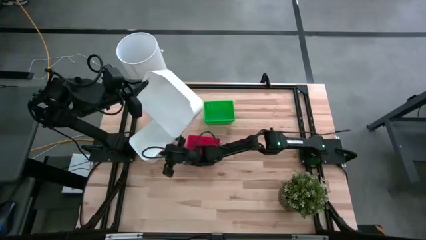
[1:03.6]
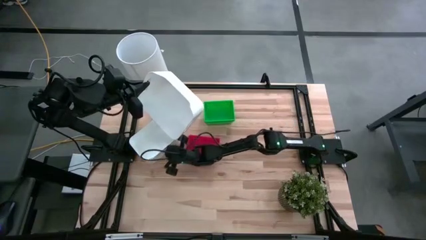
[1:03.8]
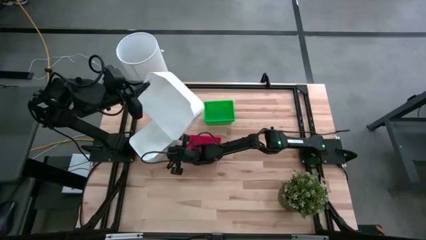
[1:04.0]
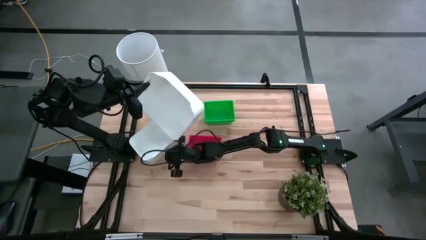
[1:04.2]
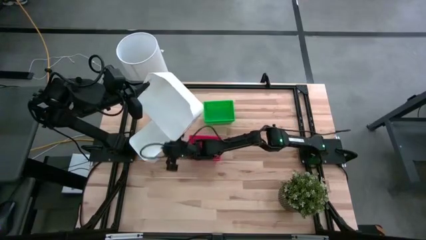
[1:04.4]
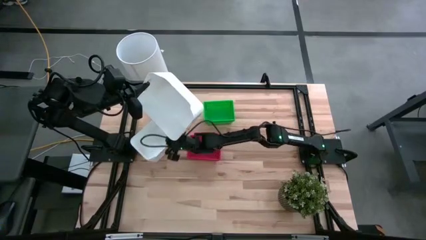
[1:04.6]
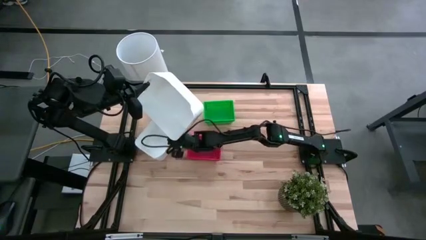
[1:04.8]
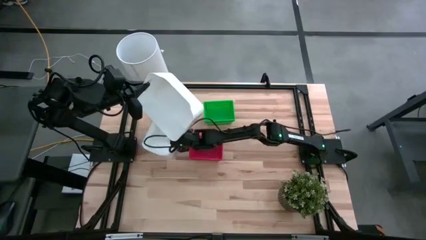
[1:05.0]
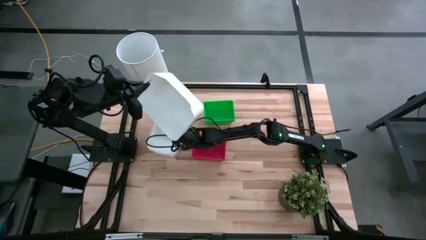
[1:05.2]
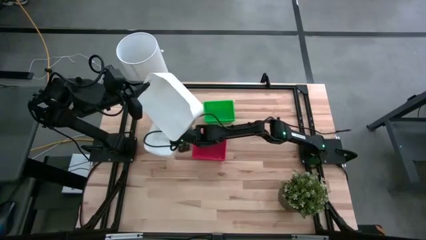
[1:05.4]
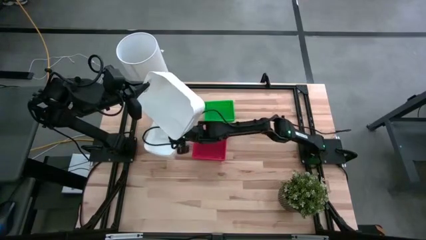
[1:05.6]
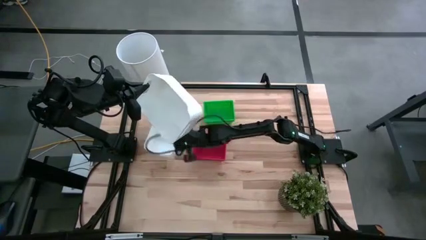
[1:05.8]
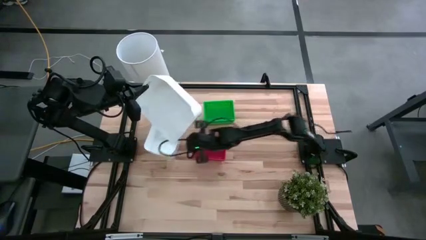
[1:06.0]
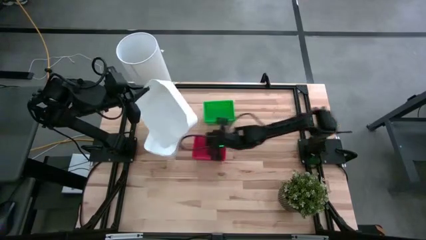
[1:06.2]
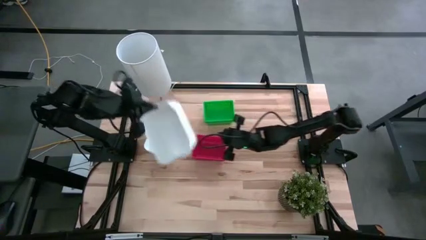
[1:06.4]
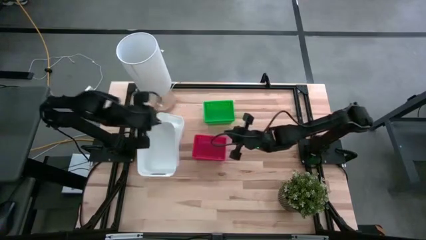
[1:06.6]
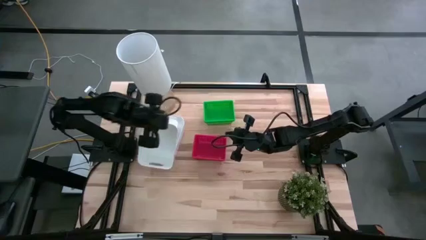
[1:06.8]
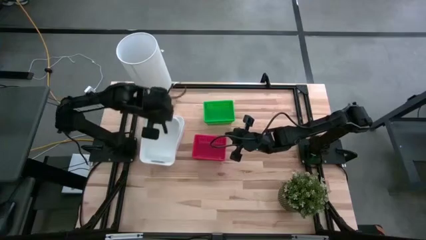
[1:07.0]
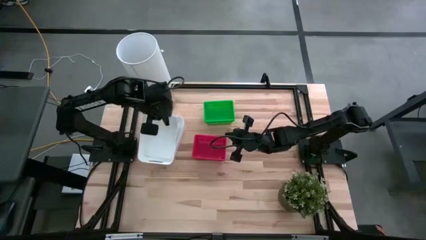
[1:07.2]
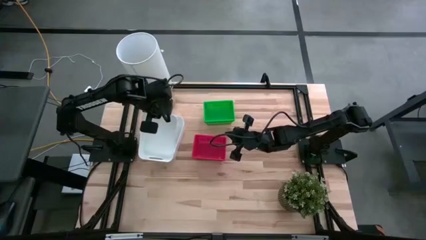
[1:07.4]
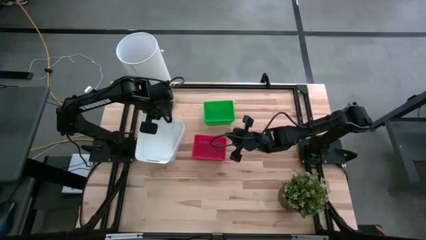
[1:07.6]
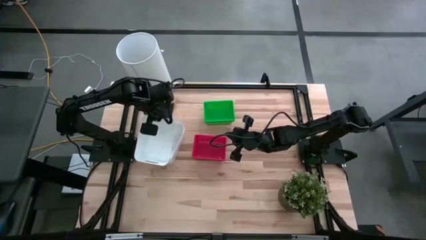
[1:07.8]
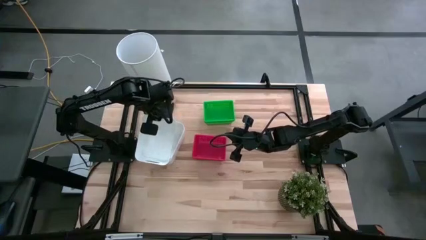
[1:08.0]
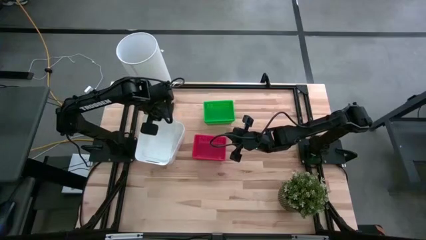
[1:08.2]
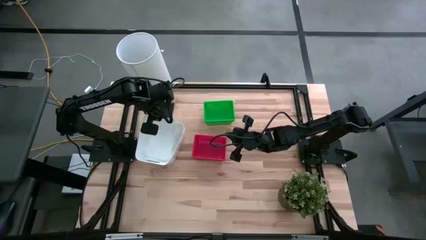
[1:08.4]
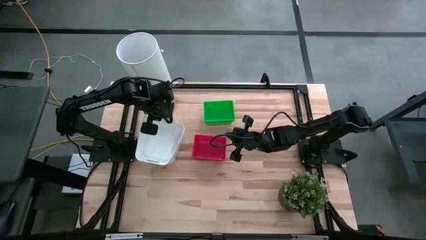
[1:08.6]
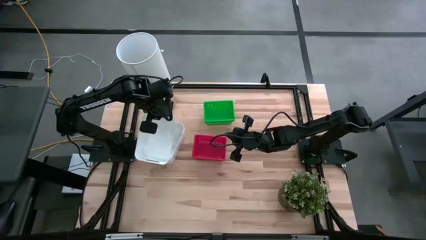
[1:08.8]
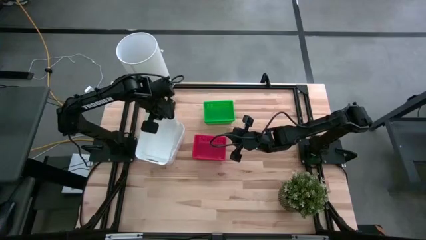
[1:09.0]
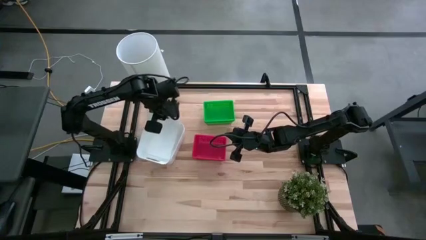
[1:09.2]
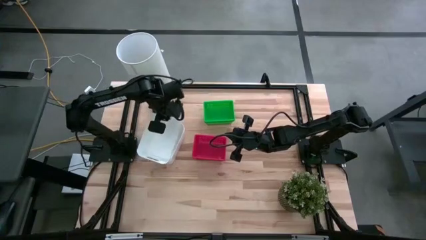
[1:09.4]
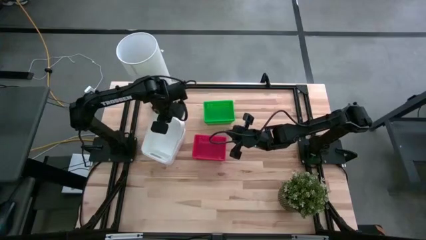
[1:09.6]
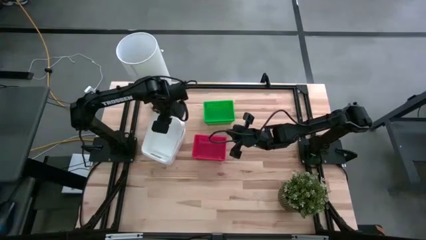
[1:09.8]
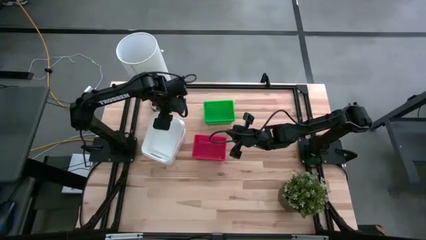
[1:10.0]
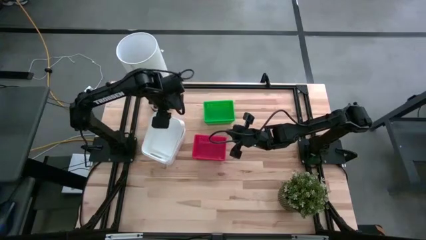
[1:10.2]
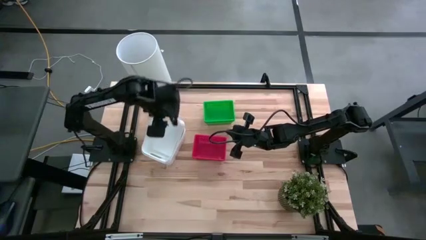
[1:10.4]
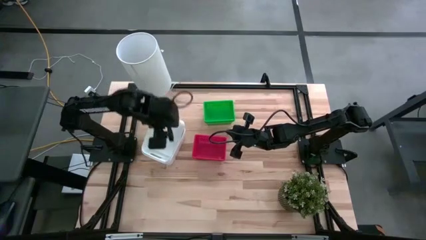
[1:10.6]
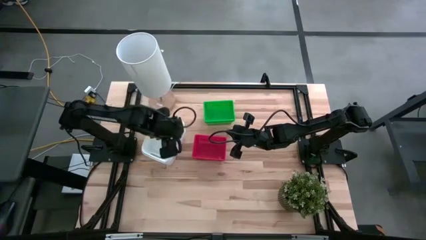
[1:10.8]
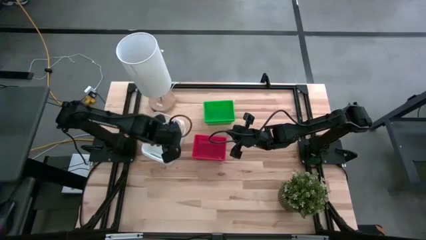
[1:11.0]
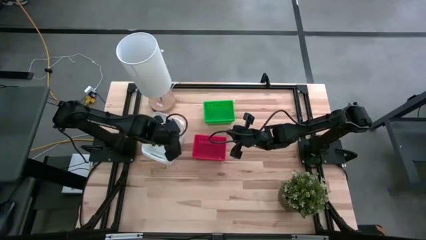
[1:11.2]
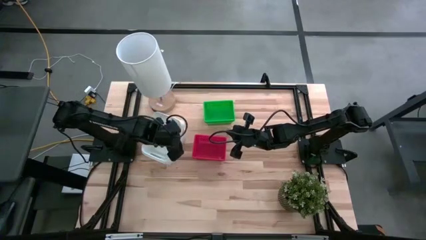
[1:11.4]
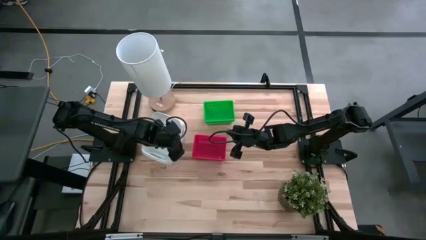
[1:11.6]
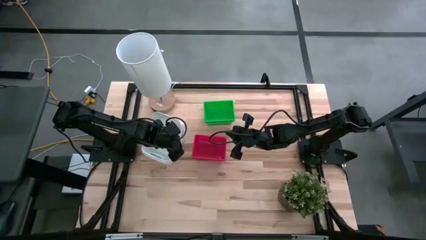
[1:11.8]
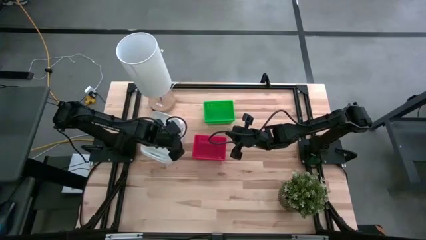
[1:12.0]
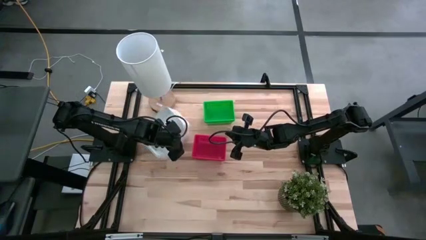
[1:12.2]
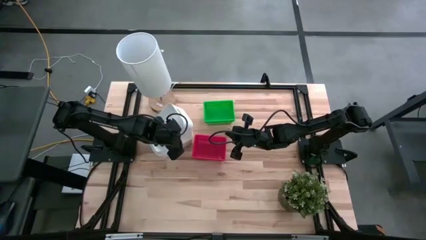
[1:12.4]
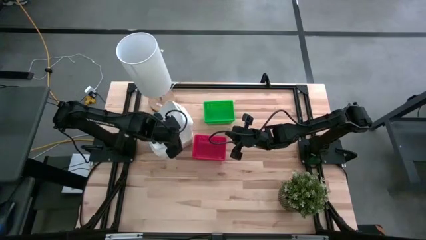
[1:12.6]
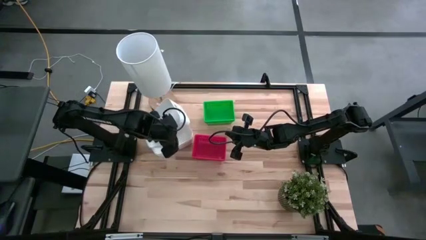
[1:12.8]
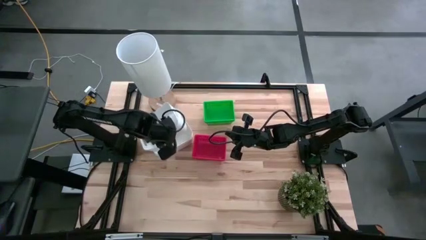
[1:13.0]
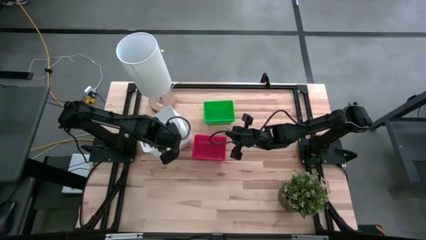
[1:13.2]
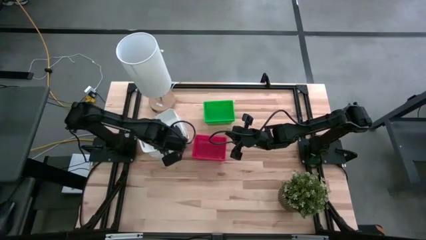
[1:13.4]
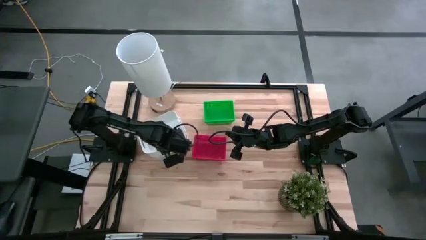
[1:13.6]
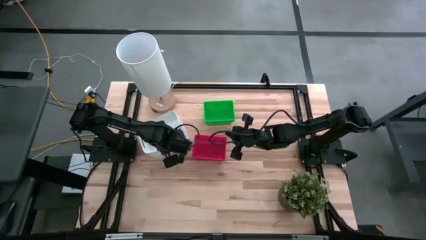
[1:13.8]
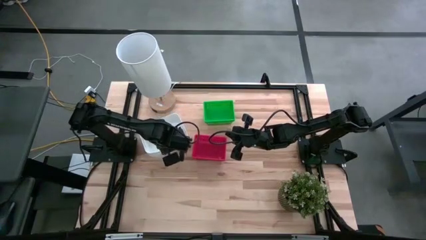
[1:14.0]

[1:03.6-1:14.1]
Stack the right white bin on the left white bins
